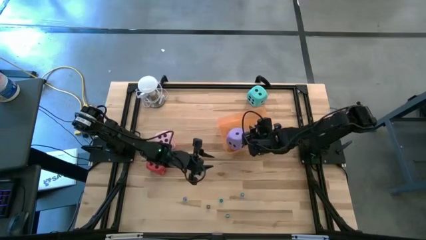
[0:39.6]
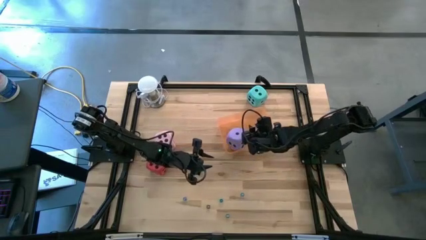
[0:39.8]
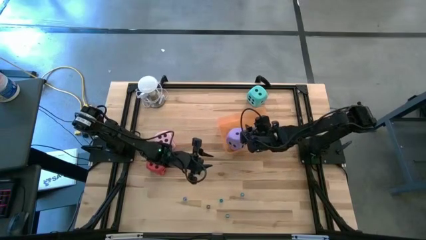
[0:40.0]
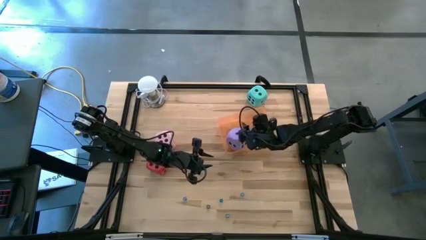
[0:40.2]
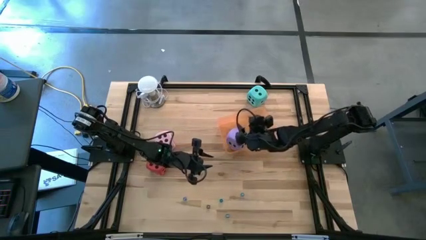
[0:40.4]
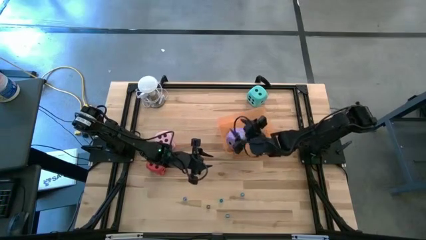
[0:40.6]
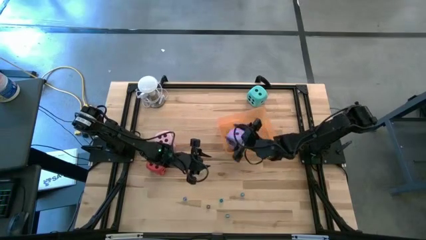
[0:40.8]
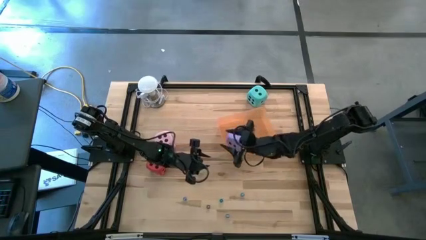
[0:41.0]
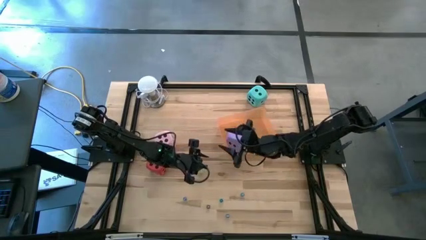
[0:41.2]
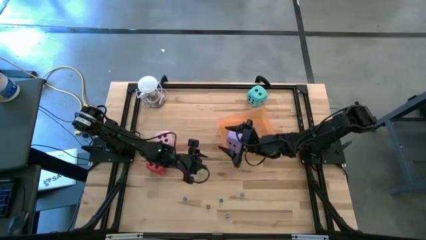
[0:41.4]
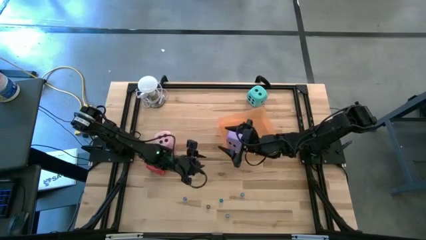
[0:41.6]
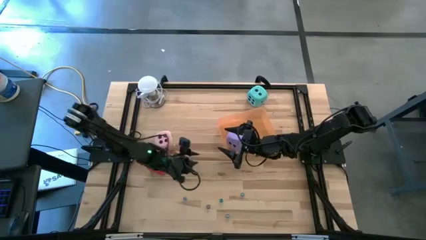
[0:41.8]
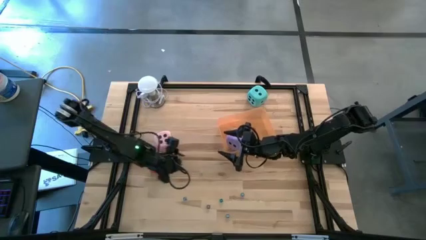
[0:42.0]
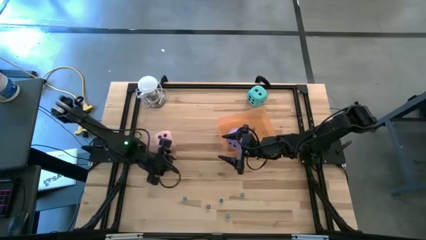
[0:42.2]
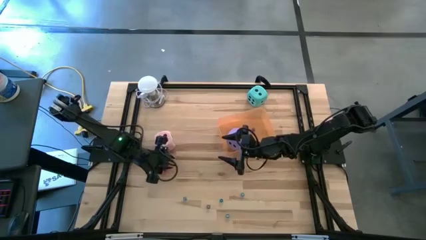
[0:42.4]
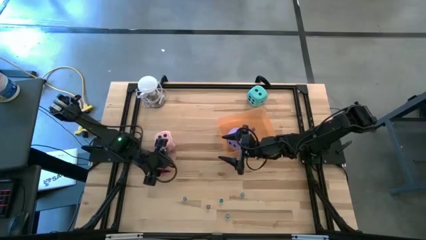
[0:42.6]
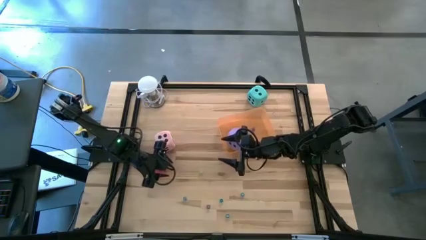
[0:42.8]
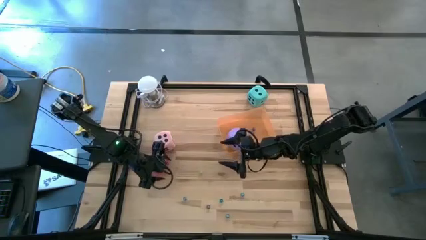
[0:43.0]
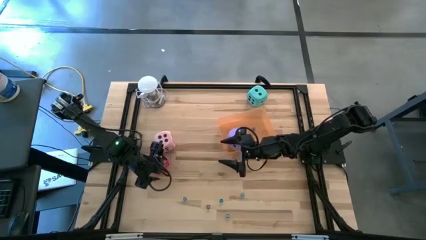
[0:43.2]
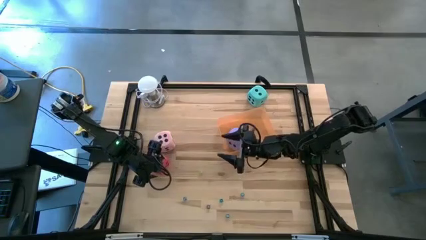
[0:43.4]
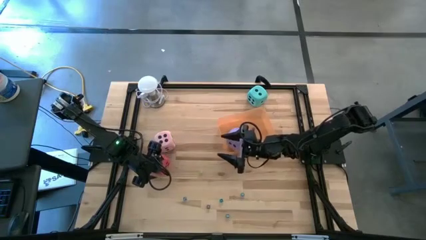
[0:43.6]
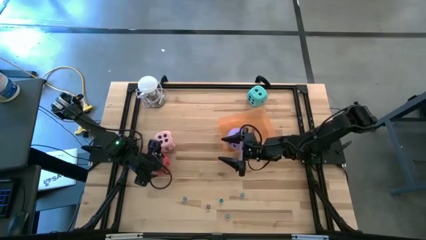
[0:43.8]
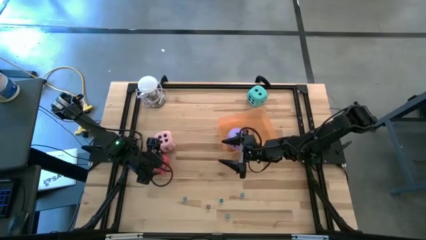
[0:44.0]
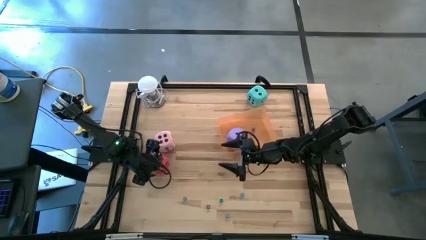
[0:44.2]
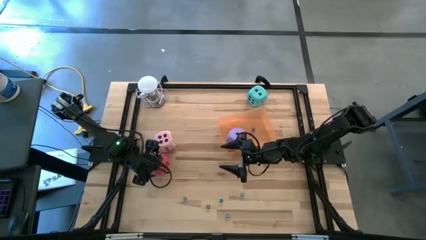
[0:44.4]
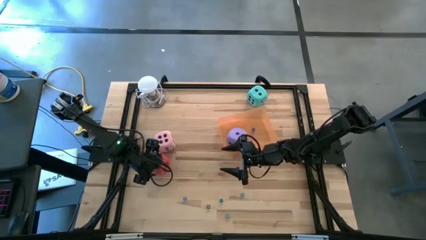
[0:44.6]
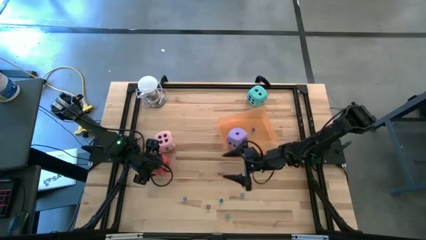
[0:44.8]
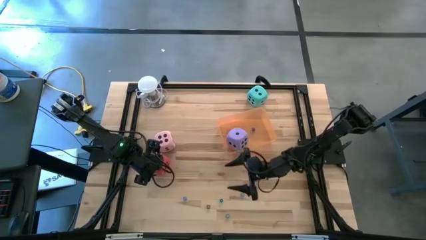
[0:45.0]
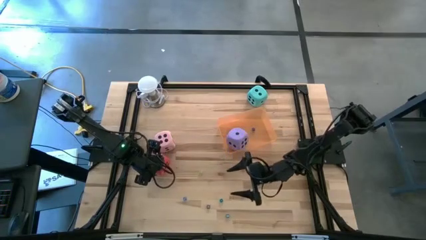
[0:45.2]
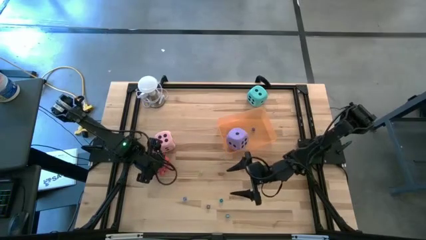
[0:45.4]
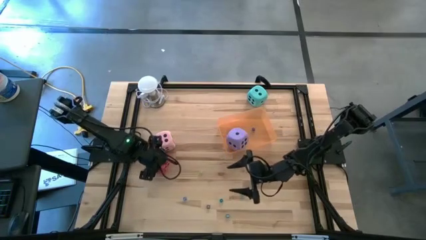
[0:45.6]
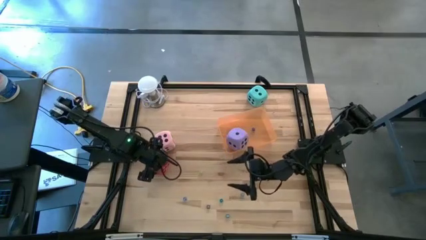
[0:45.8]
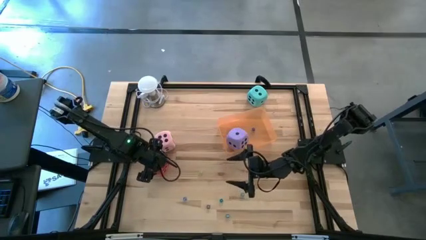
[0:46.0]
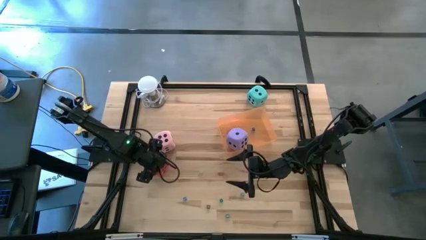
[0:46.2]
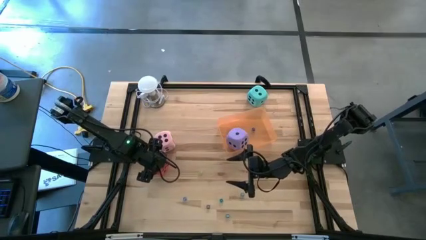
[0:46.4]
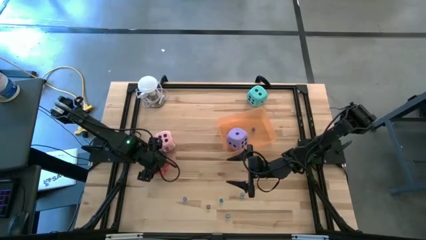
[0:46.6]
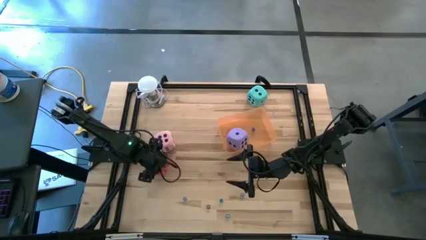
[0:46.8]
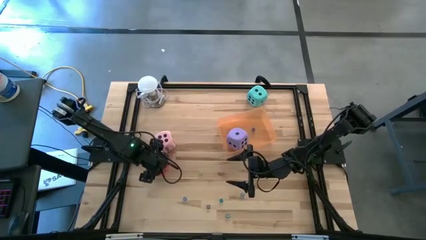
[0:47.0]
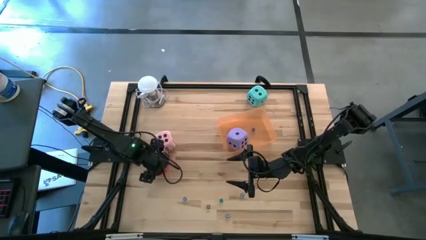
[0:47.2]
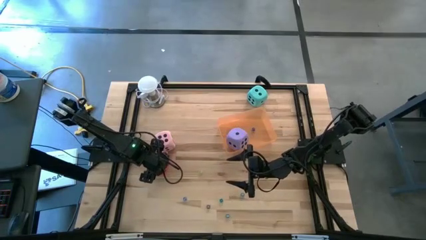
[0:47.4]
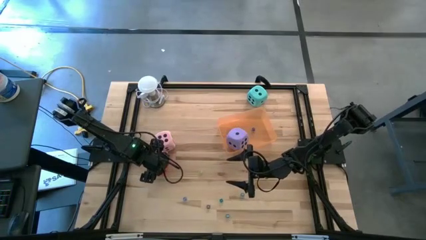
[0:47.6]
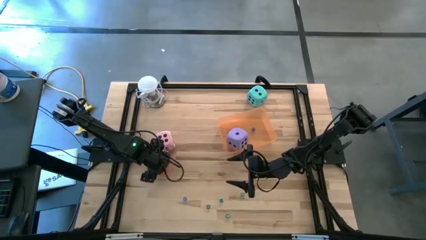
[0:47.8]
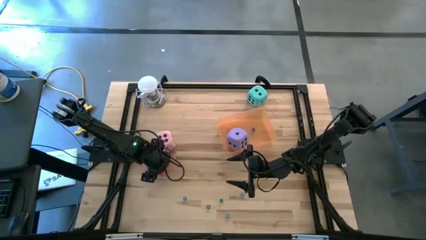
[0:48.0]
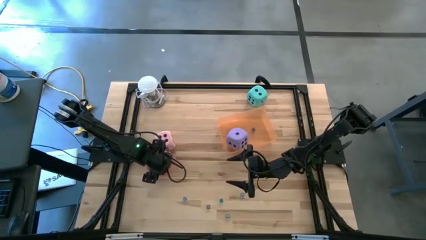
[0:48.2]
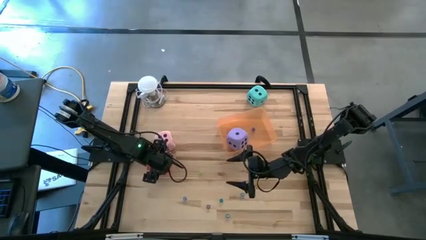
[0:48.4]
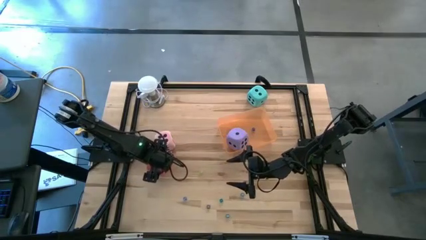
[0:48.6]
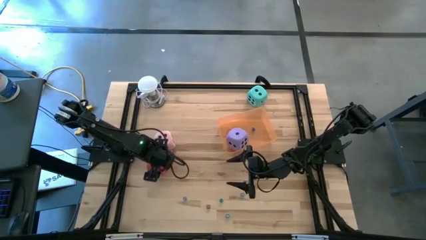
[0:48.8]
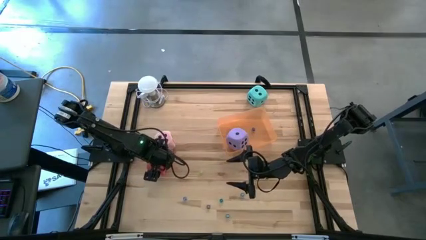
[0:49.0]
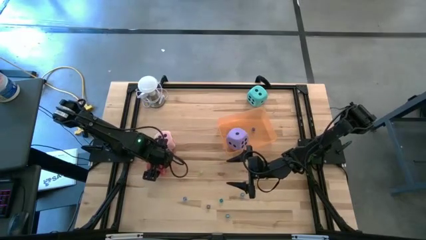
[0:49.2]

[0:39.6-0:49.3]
Task: Pick & Place Dice
Put the large red dice into the orange bin

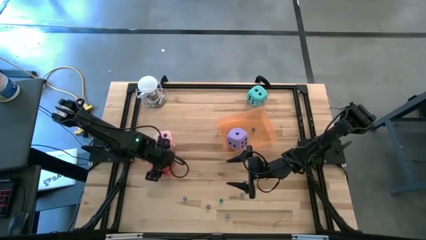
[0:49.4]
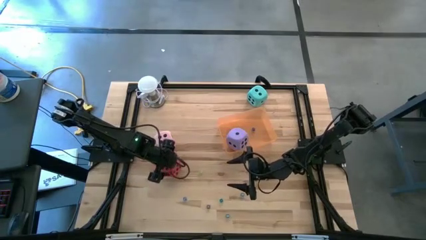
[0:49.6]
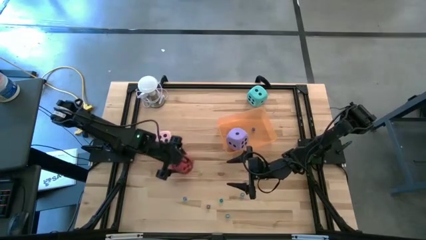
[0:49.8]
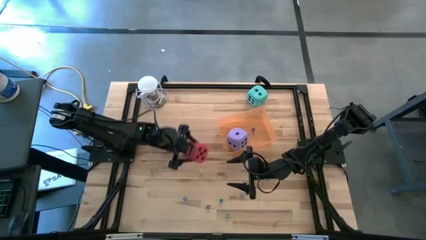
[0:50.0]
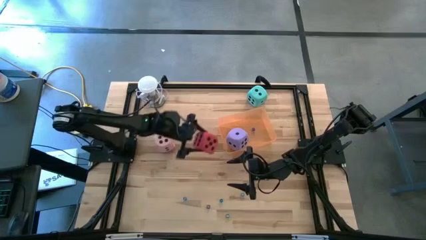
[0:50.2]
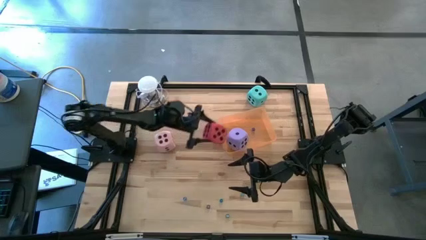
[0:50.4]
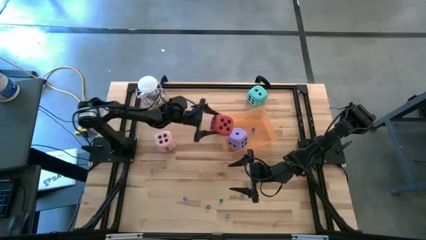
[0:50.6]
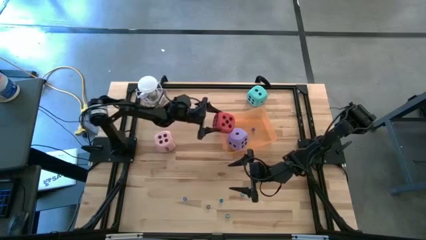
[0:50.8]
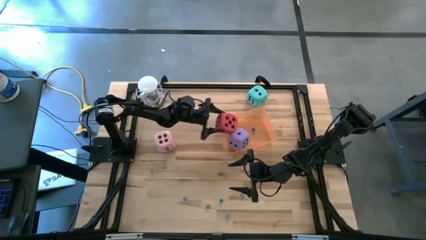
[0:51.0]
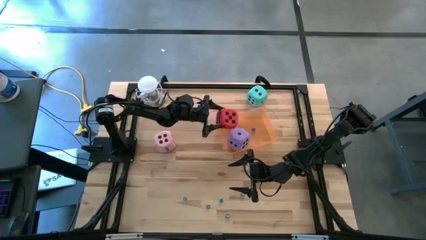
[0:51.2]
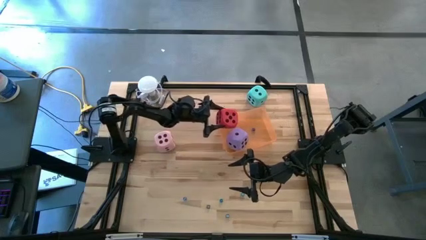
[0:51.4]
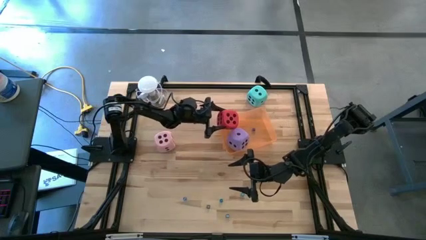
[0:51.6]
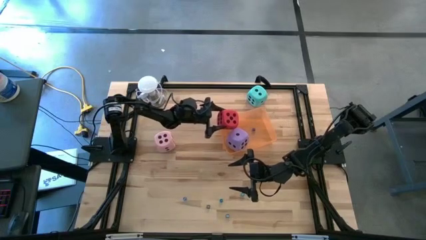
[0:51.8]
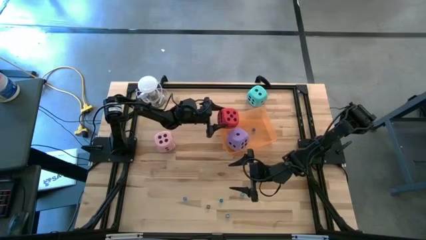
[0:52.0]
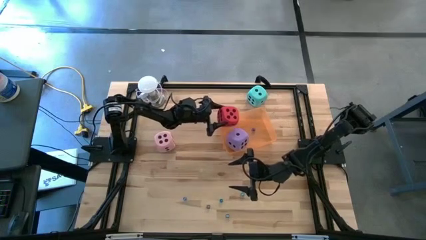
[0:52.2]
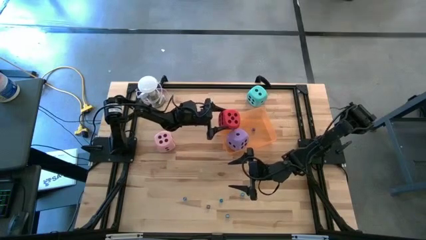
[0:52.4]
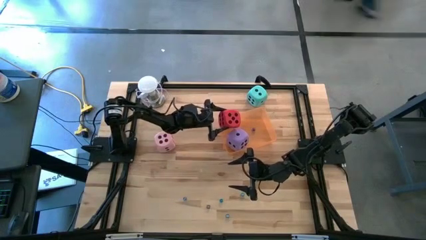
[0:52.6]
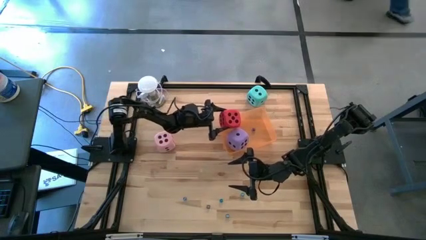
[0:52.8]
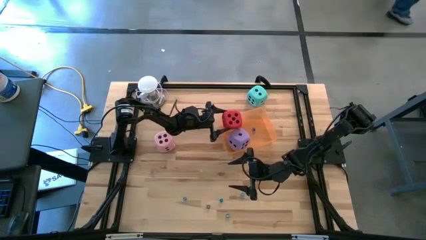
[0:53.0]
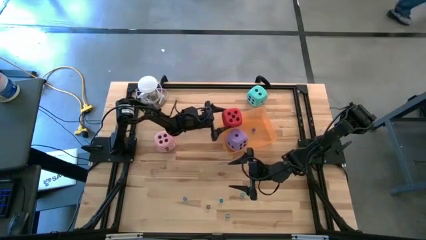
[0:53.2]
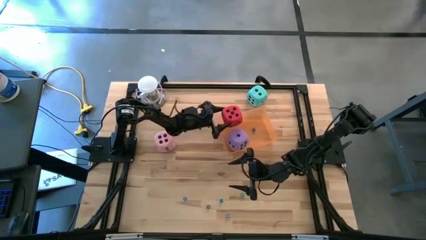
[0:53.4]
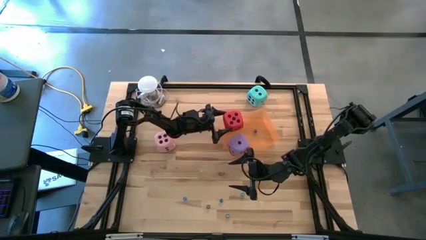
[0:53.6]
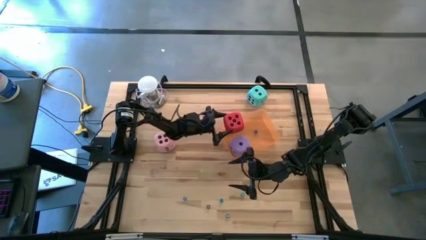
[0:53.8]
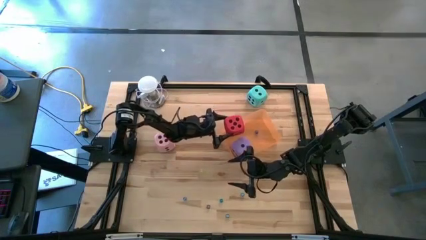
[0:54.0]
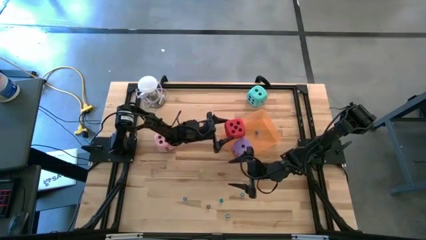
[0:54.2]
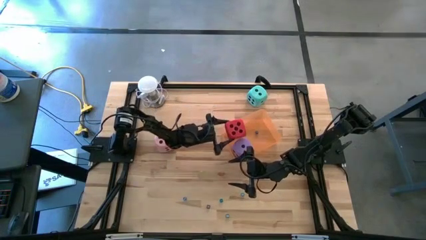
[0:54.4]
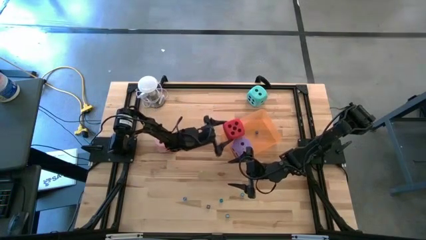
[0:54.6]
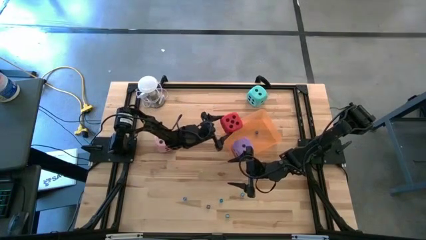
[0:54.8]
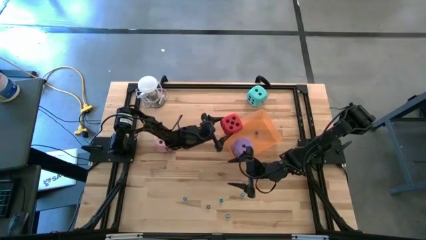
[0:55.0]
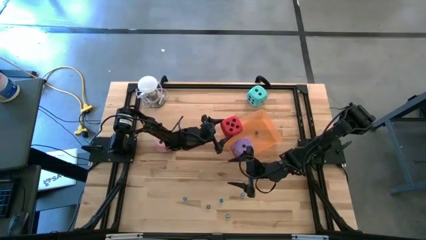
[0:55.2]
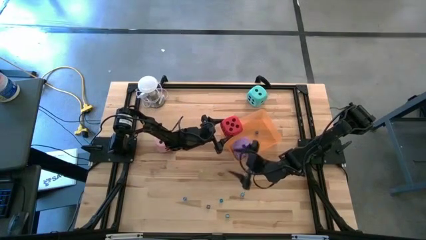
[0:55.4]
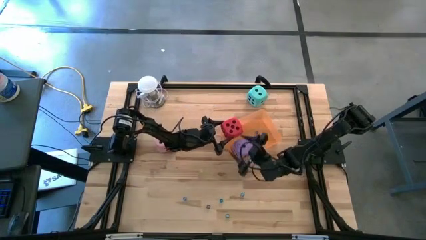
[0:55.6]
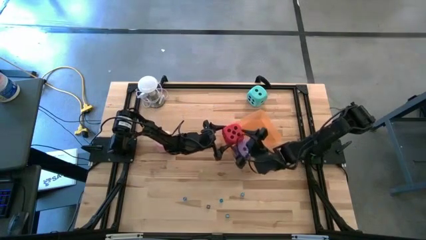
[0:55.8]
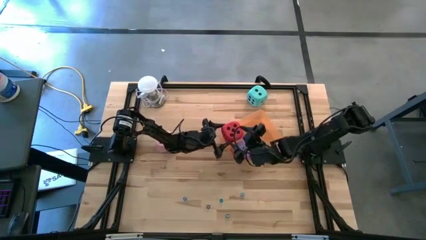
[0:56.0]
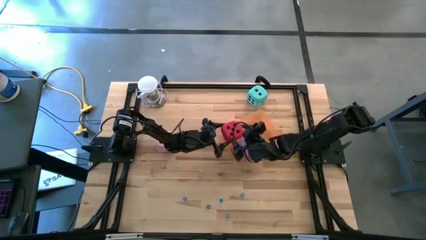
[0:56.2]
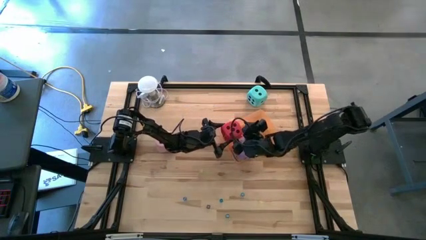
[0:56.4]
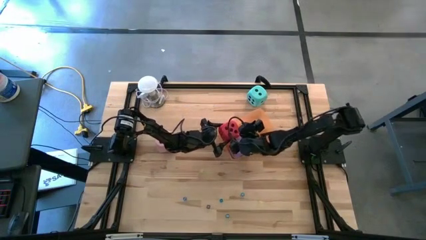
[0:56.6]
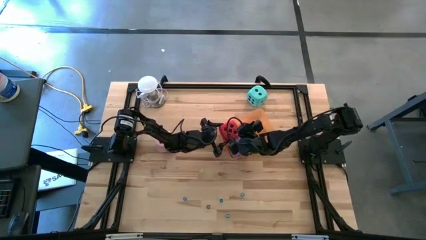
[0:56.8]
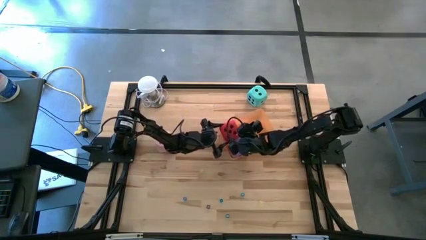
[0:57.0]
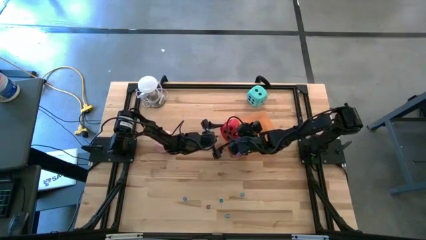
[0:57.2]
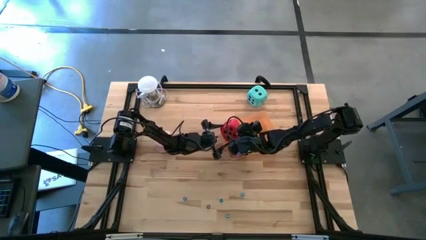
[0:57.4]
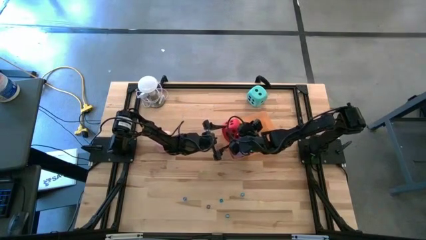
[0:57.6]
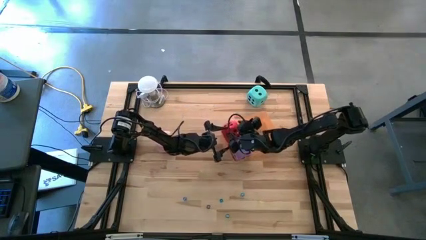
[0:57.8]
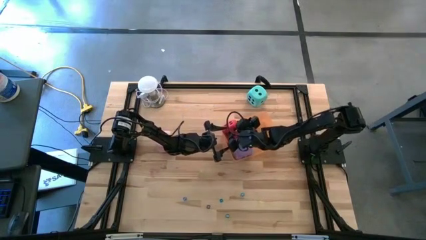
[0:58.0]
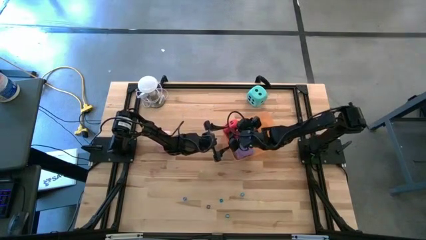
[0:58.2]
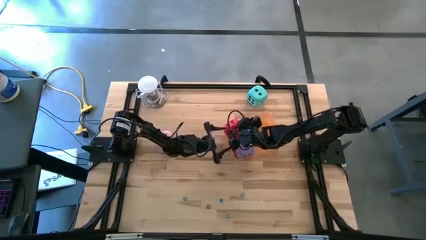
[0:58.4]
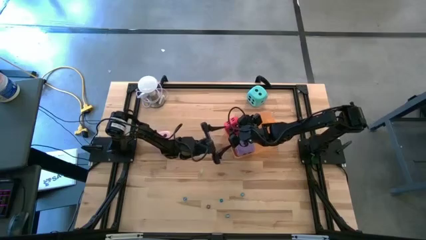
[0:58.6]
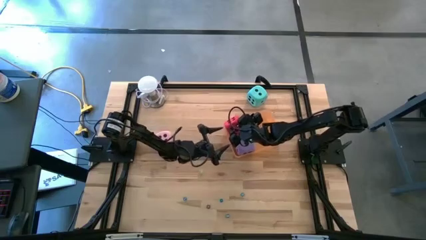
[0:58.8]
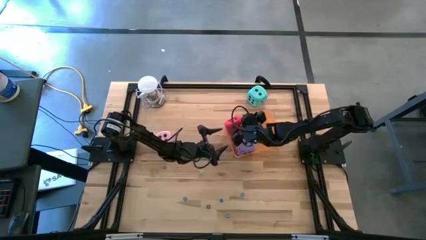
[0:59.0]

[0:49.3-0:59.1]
Put the large red dice into the orange bin
